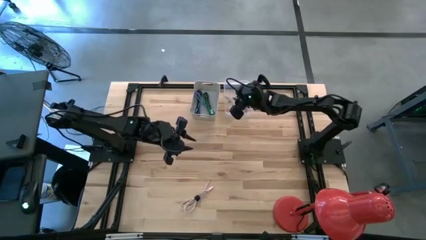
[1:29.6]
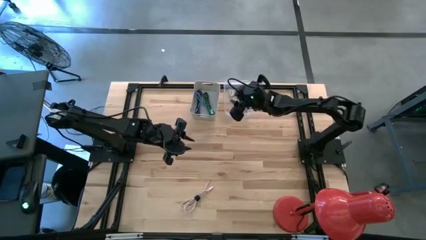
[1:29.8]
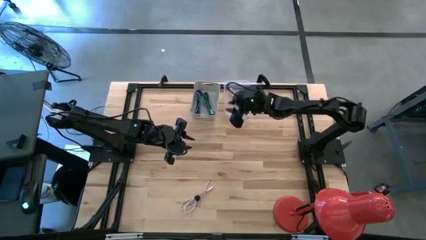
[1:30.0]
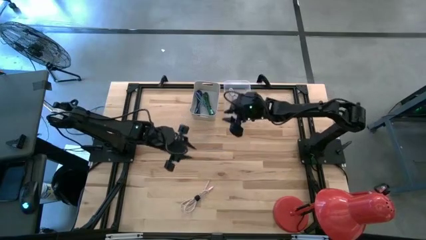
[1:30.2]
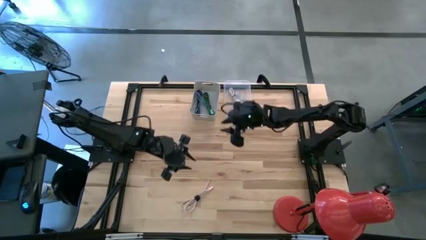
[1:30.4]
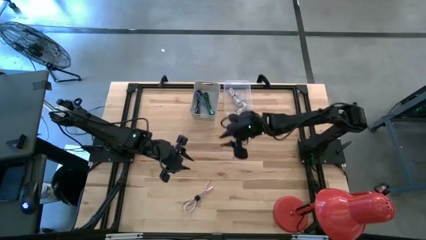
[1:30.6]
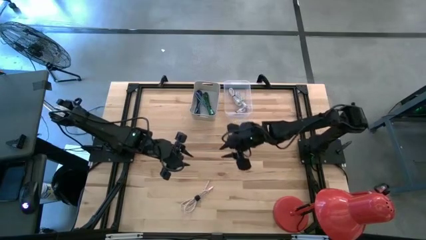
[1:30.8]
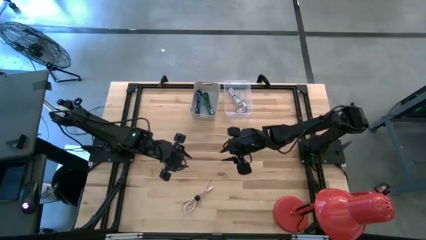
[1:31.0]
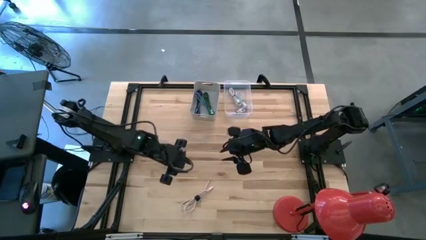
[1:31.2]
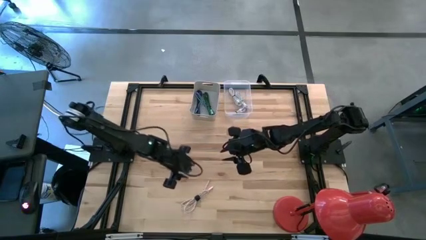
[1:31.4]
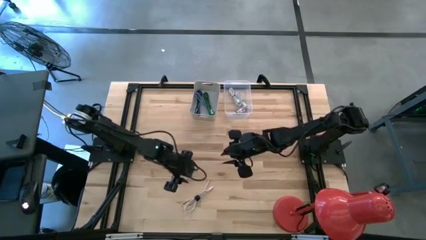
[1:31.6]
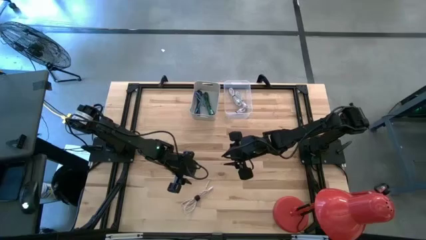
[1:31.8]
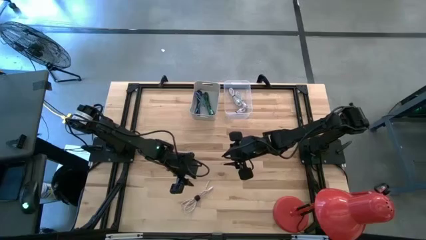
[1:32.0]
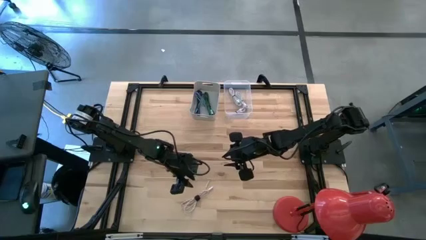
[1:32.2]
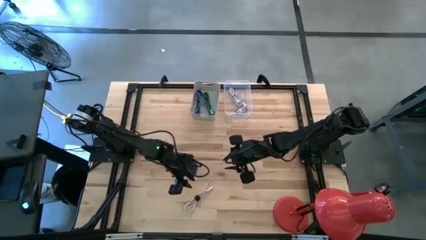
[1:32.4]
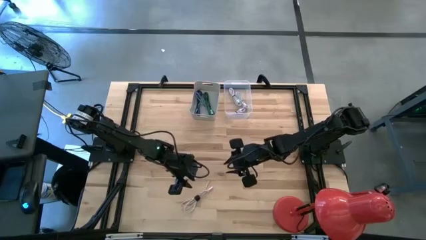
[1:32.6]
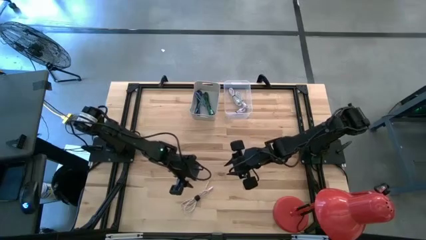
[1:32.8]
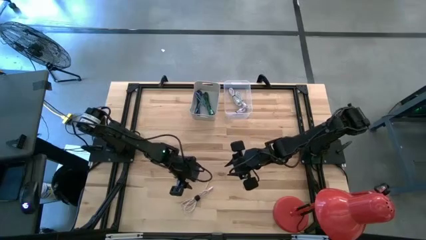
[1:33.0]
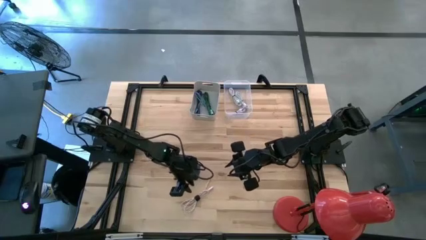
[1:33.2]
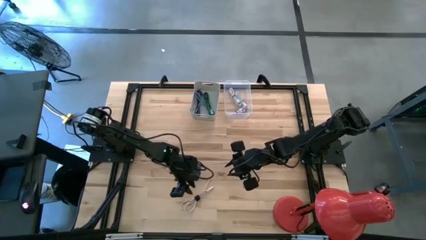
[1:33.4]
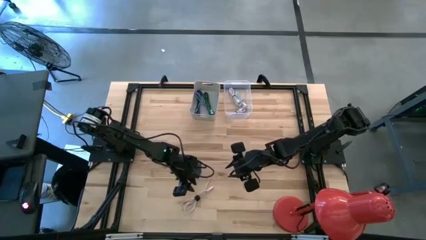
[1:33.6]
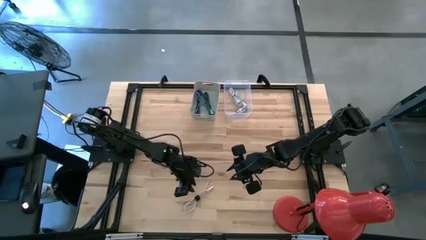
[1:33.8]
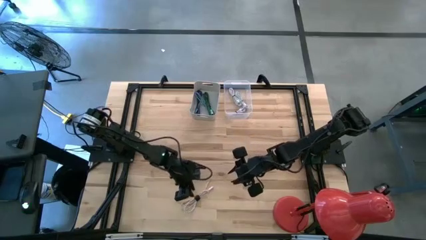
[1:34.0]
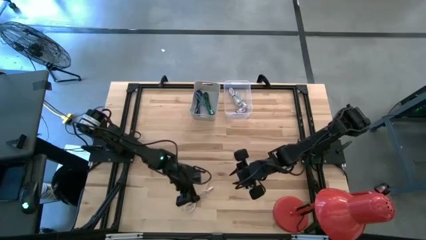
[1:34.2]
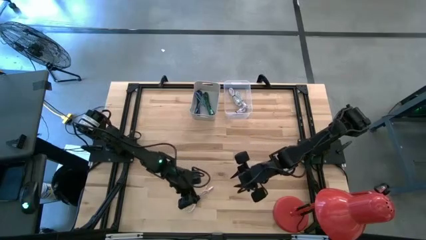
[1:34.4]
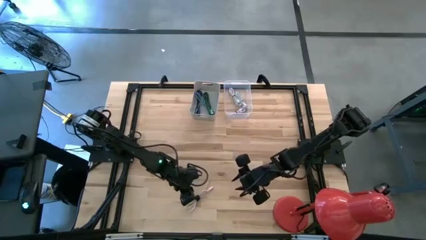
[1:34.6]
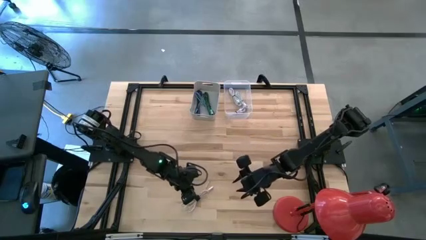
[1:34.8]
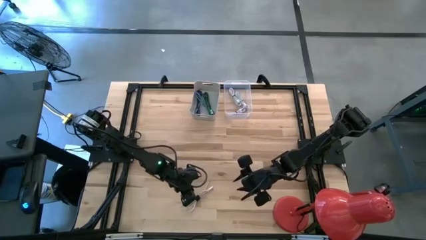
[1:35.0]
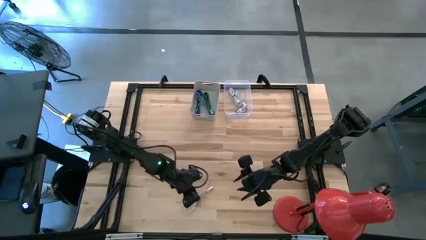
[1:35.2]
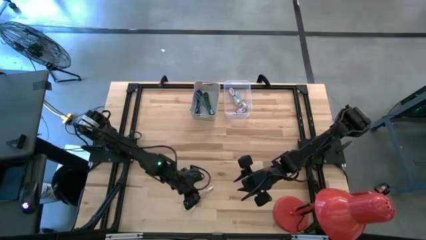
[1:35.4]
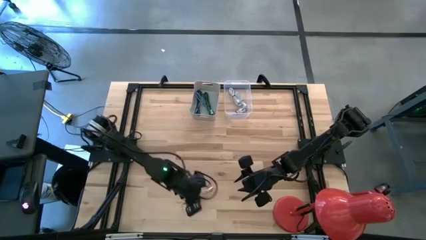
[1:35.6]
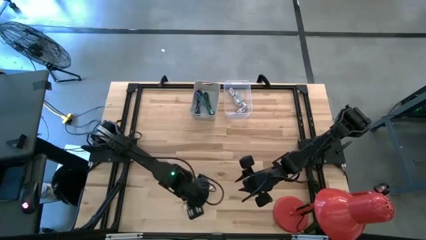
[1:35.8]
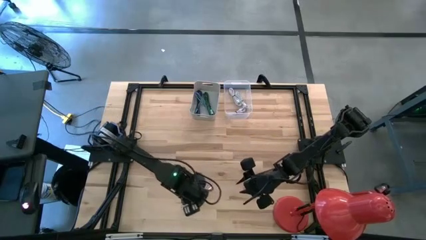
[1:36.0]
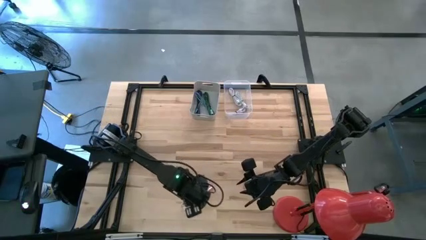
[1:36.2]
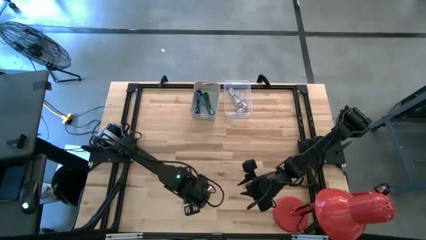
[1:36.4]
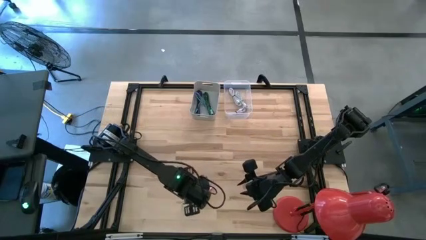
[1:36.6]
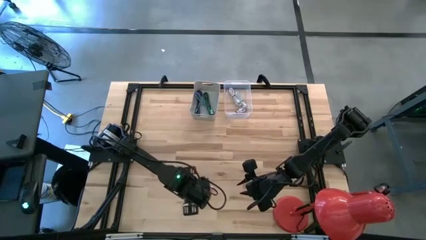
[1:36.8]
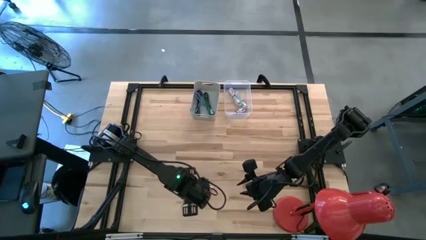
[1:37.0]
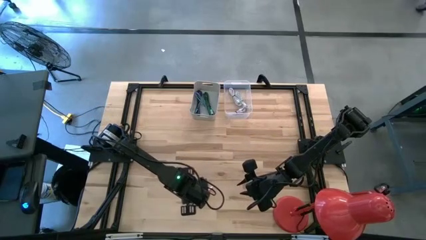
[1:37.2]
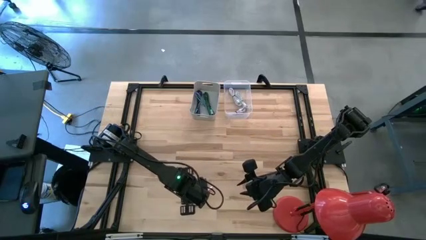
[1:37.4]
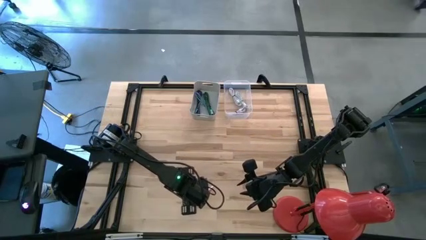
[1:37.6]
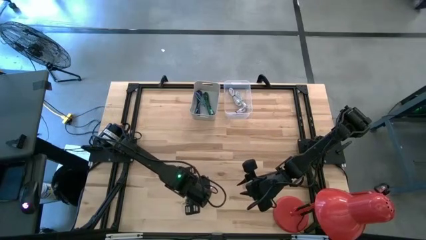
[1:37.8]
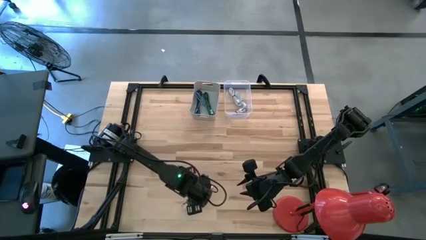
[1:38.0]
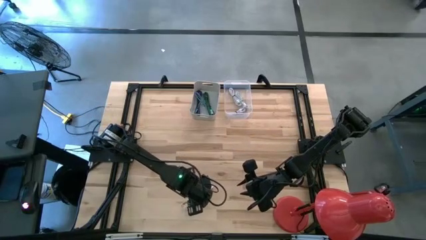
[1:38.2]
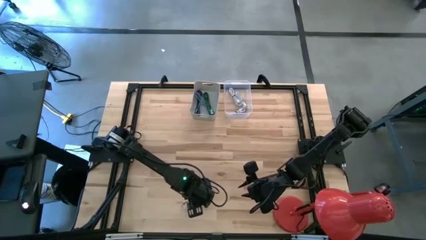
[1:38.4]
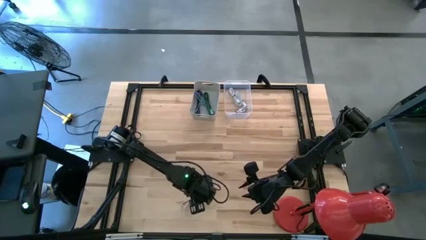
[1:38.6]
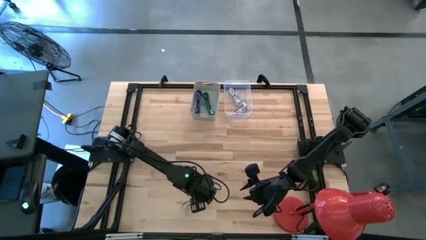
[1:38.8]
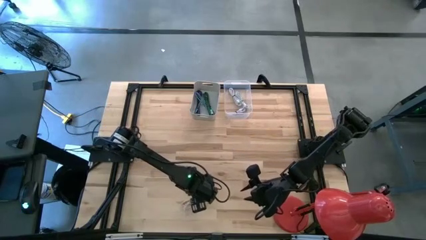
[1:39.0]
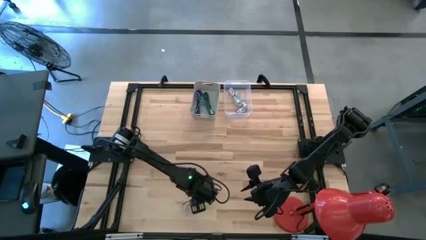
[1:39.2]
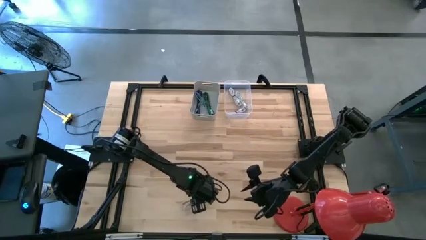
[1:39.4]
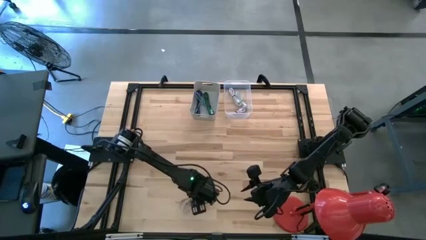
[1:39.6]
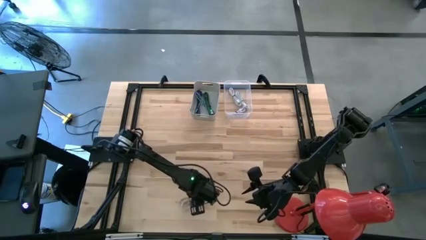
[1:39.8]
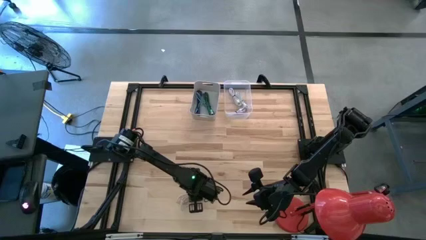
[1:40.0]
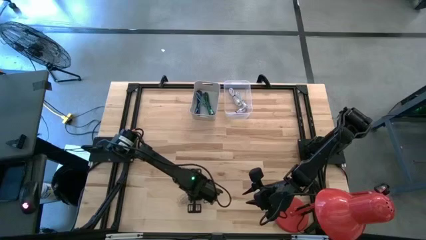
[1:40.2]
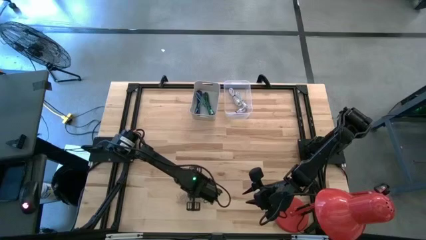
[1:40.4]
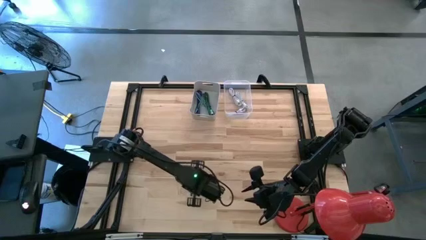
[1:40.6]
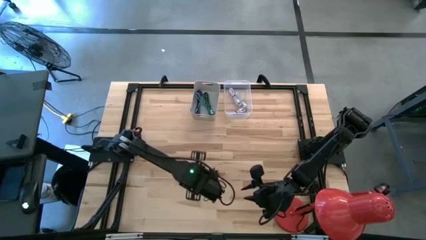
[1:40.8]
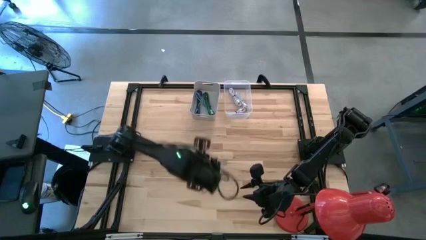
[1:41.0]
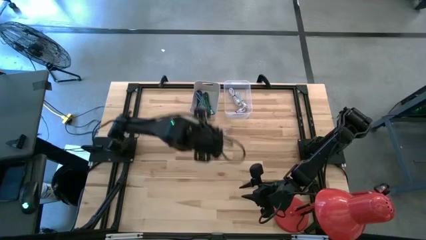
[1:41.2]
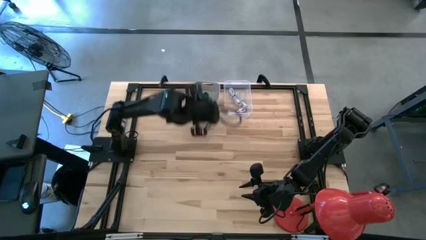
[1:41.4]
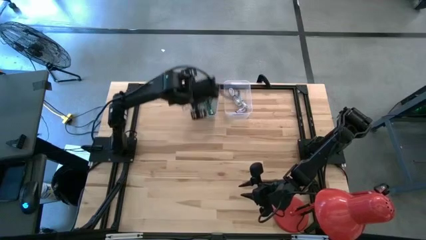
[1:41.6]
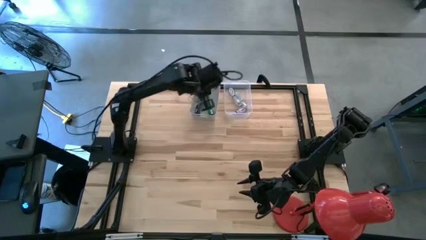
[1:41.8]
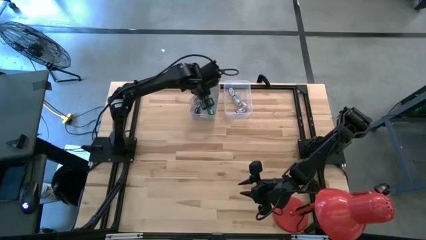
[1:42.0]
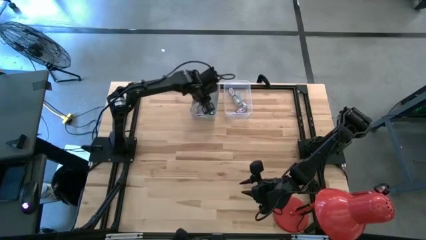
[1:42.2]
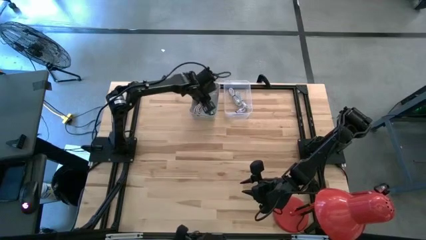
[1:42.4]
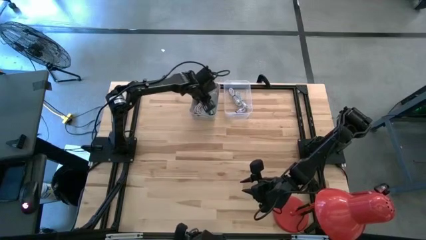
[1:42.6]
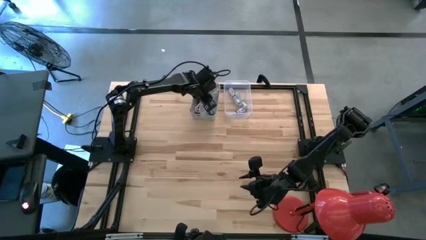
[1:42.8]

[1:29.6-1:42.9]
Task: Pick & Place USB Port
Put the pink and gray charger cable into the gray bin
